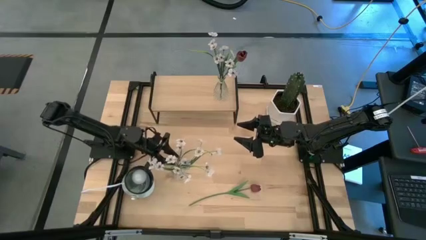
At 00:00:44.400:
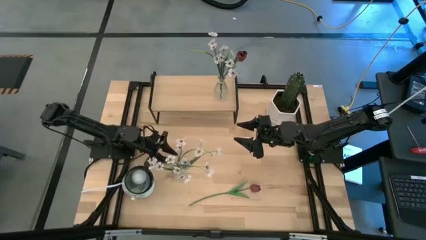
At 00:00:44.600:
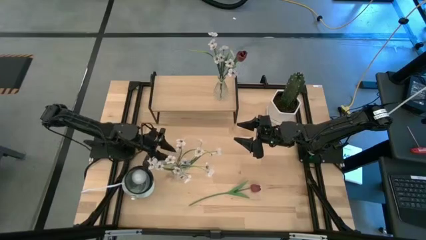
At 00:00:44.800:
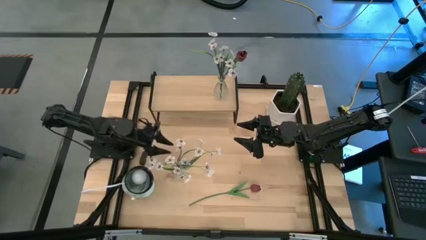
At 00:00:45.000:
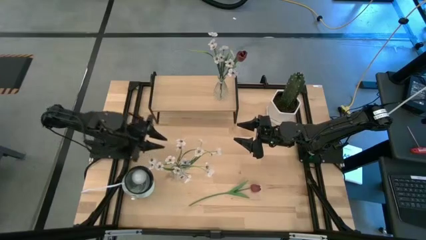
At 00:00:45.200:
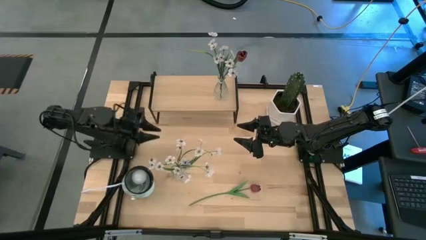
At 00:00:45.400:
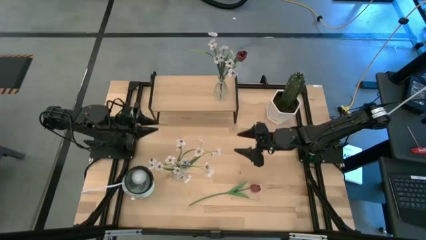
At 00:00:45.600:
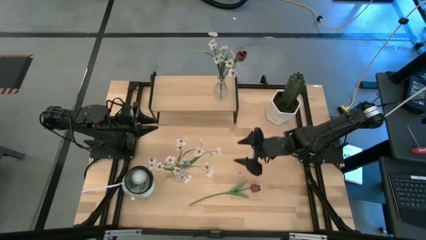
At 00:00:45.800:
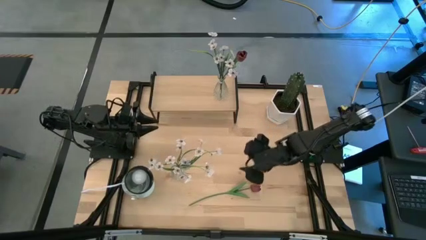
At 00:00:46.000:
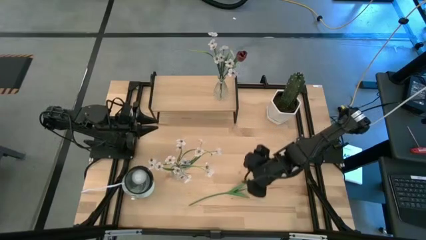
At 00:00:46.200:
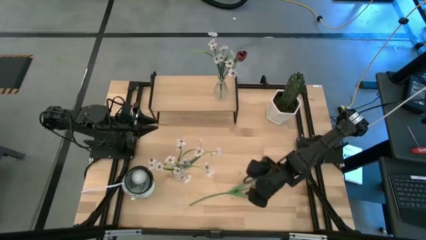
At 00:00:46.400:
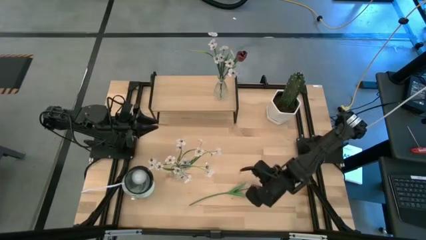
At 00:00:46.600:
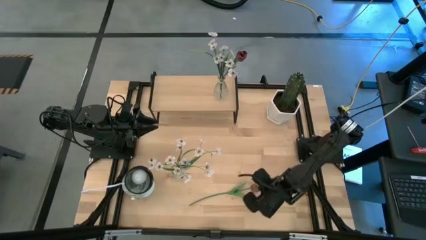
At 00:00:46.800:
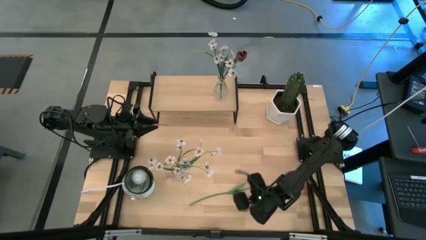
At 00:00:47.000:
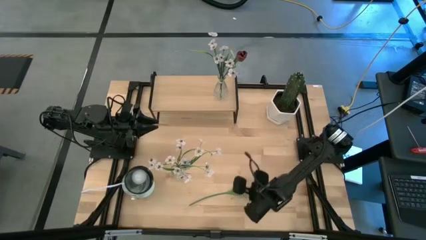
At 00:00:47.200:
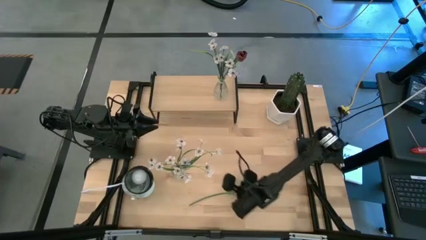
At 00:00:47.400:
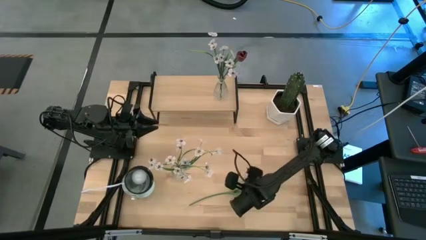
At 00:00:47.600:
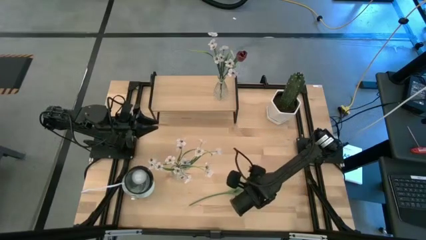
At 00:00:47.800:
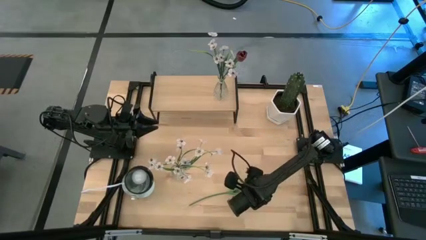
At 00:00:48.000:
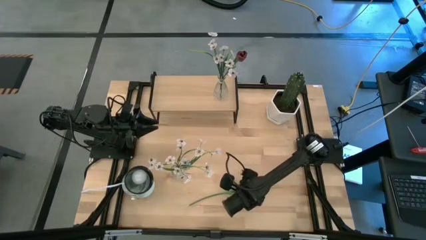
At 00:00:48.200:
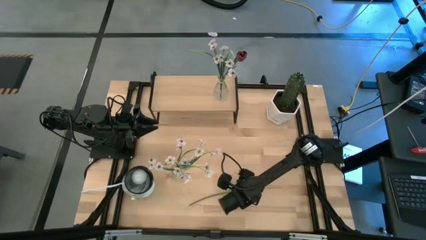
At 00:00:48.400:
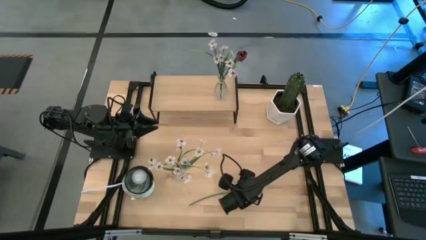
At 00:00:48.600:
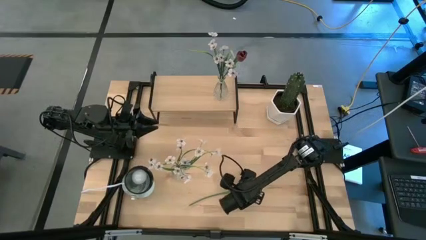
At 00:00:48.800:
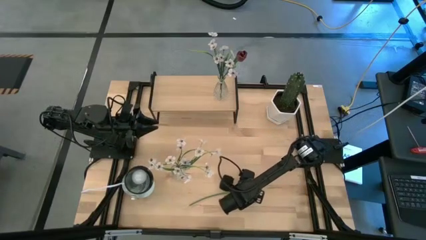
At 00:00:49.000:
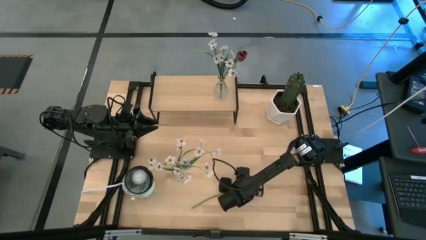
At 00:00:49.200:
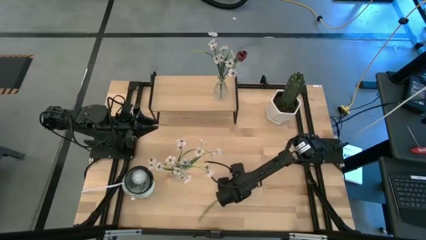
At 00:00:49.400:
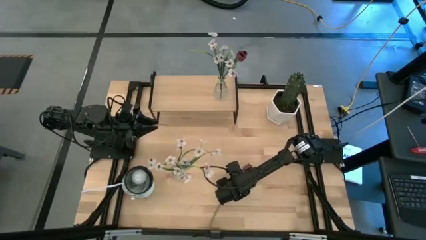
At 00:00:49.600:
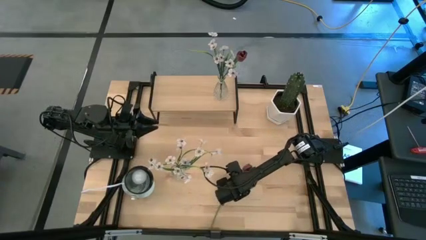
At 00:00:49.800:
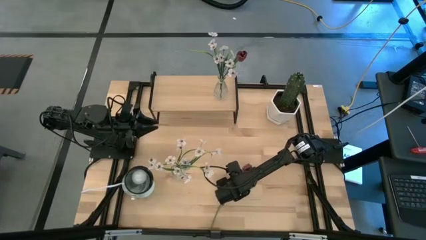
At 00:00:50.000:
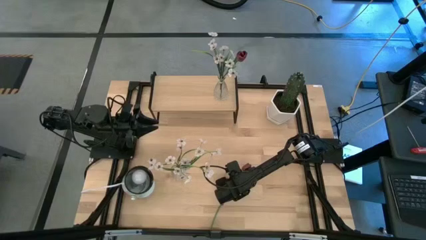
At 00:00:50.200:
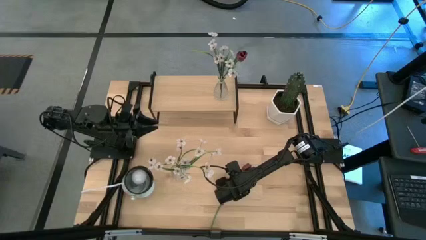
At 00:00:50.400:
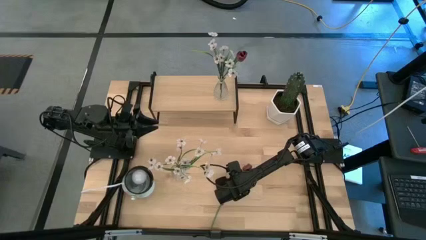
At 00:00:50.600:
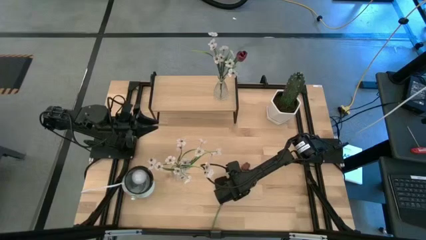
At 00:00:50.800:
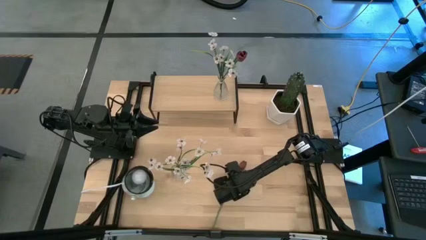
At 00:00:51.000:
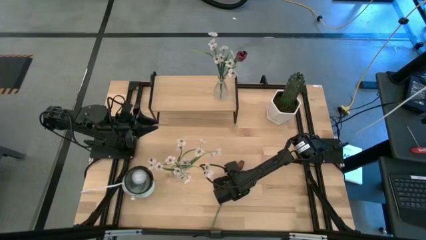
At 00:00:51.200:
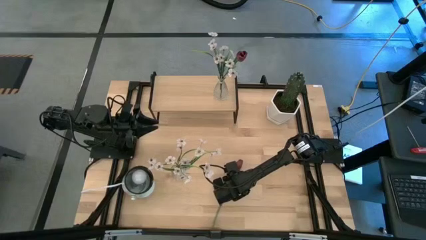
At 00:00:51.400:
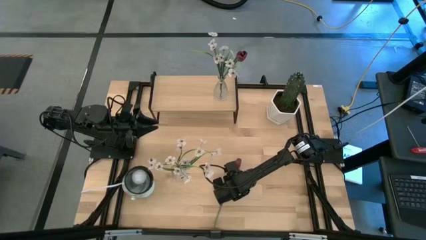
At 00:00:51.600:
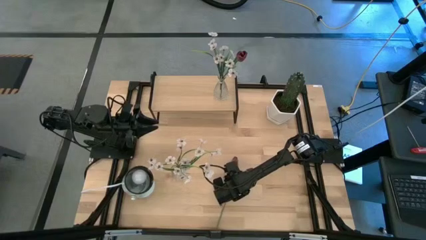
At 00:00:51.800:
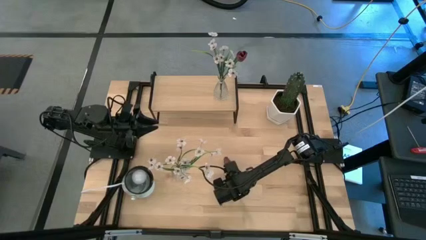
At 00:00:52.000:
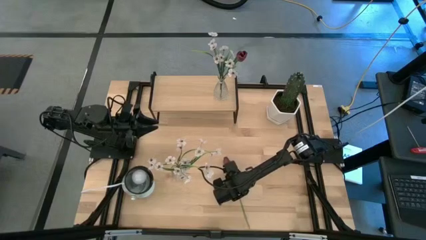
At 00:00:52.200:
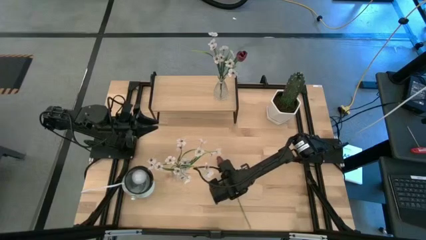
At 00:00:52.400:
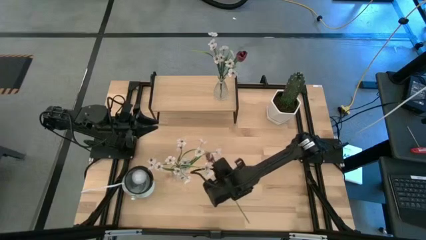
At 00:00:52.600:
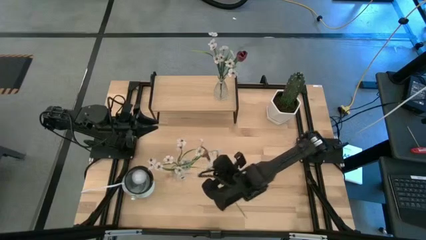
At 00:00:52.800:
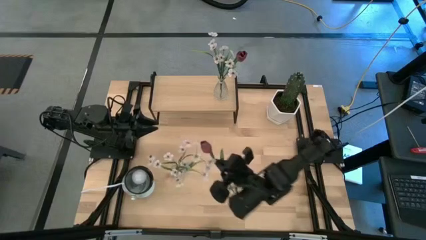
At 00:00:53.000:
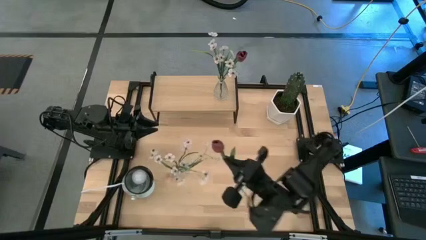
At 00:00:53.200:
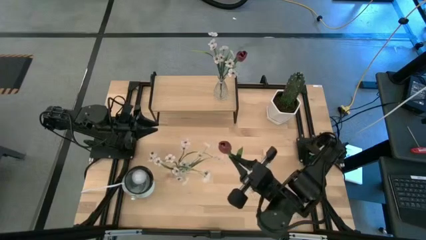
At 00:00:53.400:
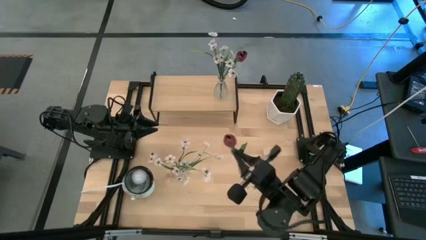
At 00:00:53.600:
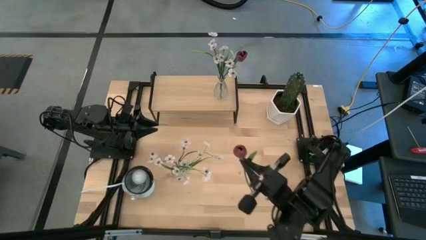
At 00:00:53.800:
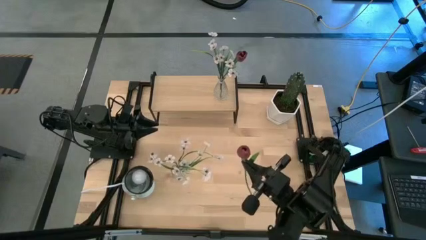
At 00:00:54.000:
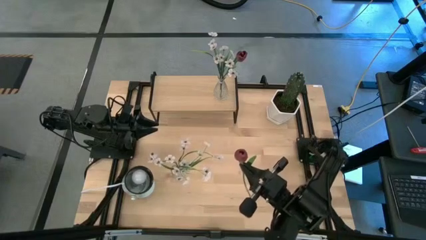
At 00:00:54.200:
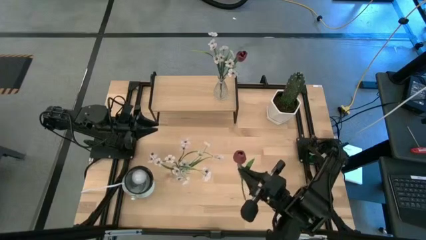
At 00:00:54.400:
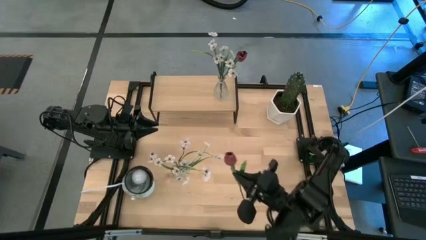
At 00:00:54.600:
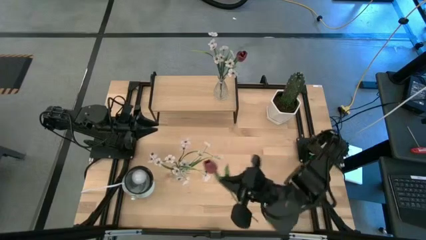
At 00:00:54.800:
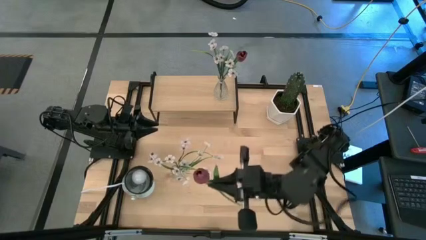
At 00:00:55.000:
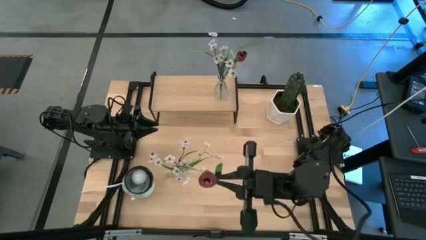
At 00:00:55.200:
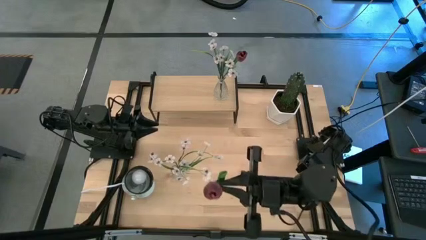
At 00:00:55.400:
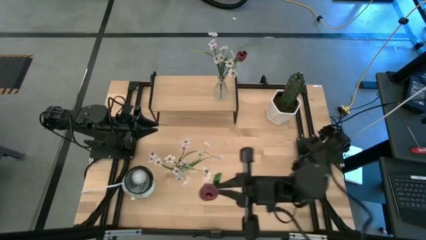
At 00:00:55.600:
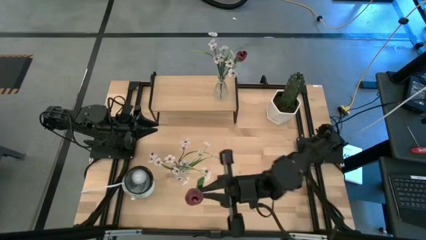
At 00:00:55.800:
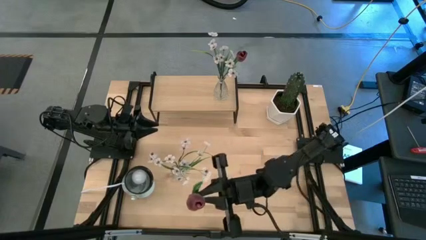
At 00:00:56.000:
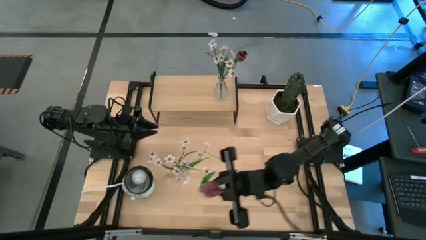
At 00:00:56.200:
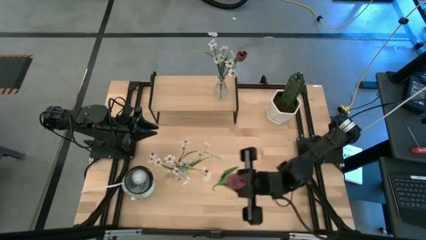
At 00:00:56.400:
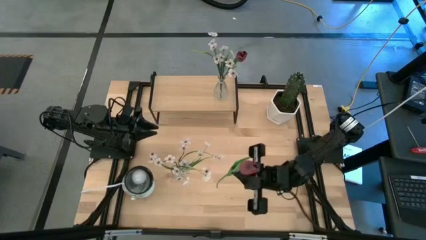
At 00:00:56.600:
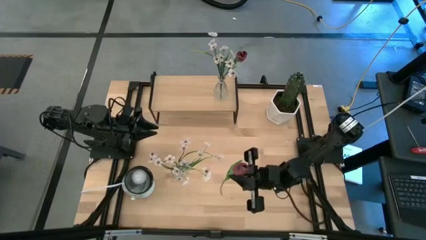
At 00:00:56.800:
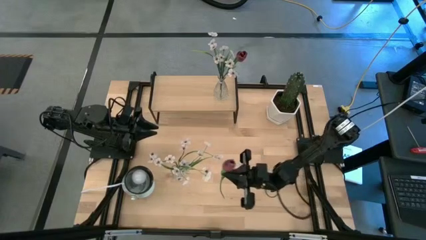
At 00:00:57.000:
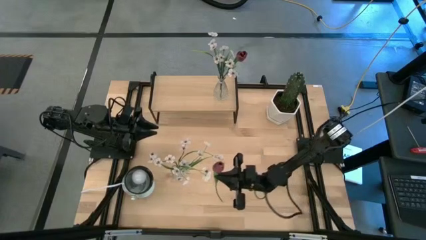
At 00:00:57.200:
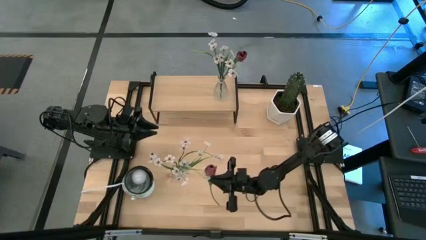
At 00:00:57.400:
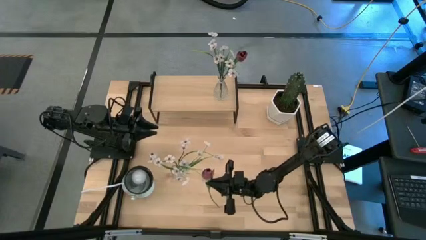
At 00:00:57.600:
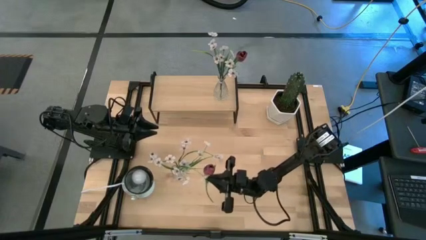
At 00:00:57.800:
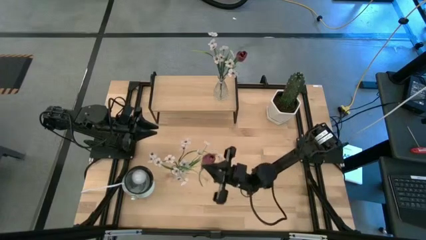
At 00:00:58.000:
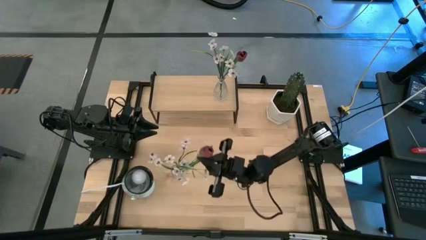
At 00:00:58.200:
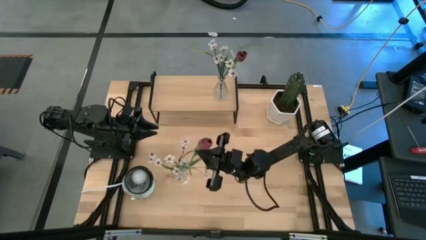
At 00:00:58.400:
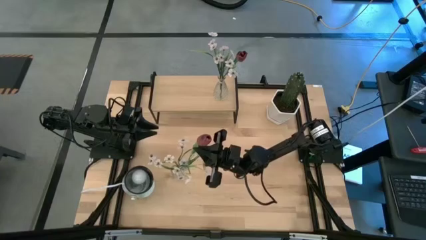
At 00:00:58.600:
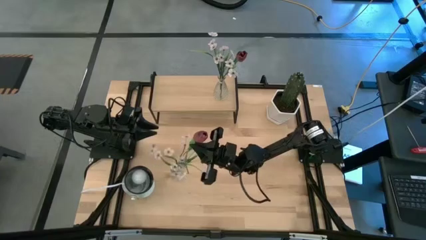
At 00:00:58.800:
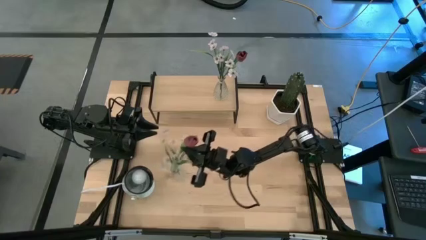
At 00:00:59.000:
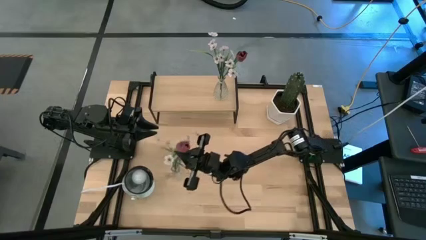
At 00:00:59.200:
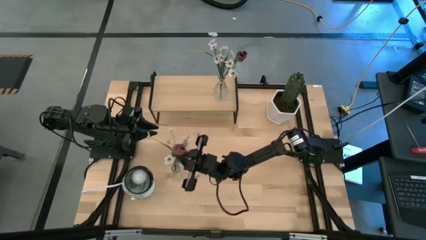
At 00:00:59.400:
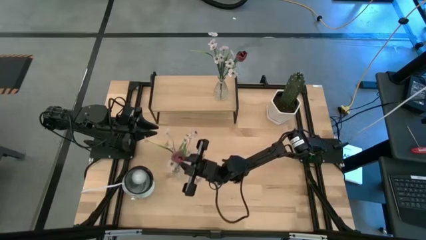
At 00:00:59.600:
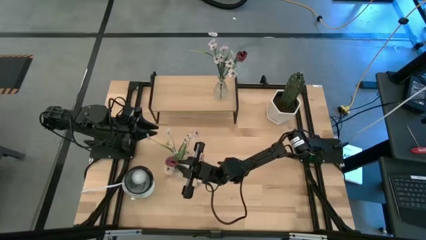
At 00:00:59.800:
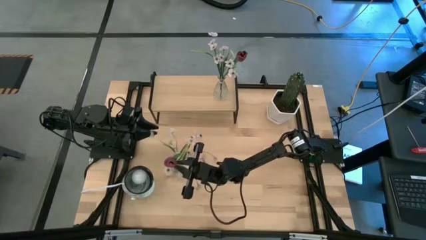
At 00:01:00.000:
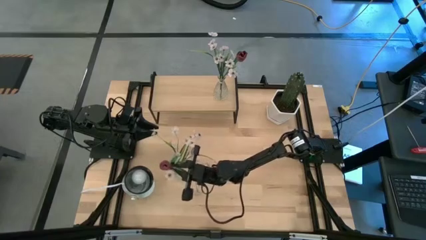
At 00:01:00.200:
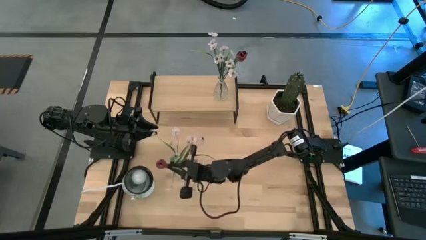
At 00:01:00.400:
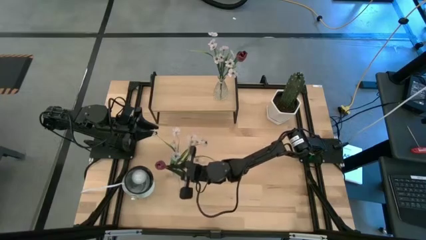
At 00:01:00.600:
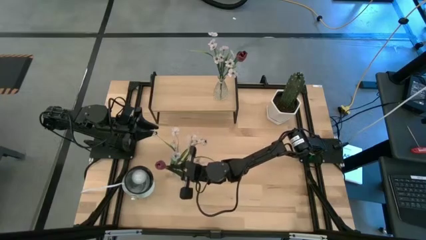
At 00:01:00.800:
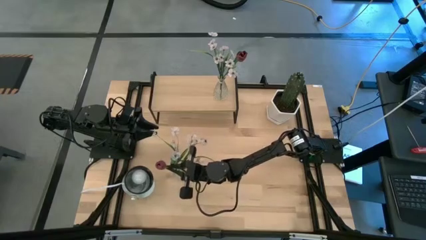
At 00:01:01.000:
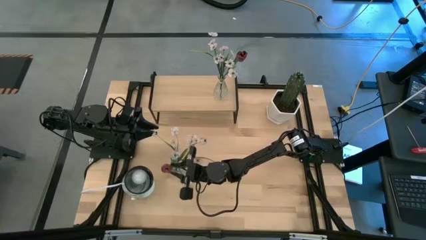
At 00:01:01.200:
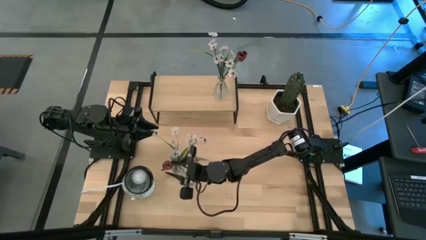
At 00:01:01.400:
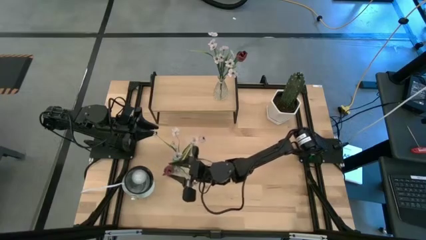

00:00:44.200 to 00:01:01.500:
Task: Pick and place flowers into a vace then onto a shelf
Put the red flower into the transparent vase
